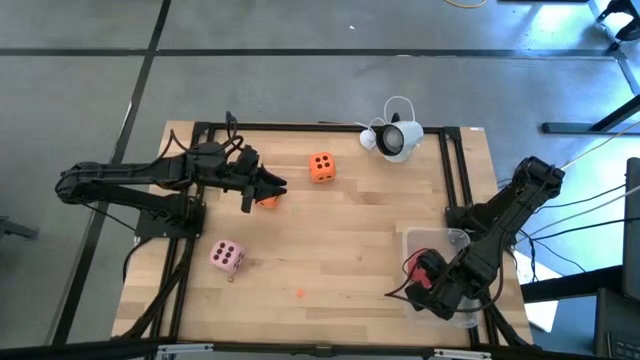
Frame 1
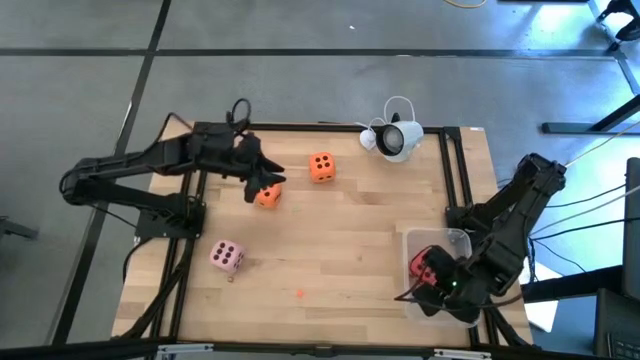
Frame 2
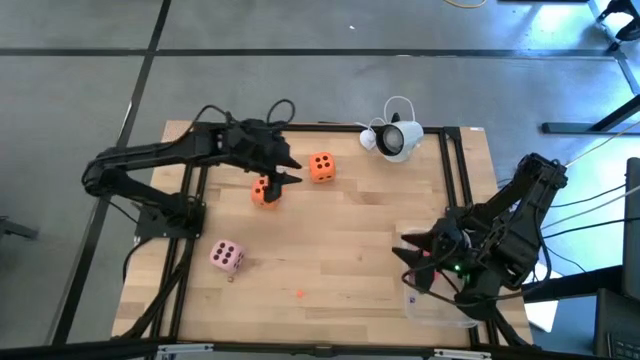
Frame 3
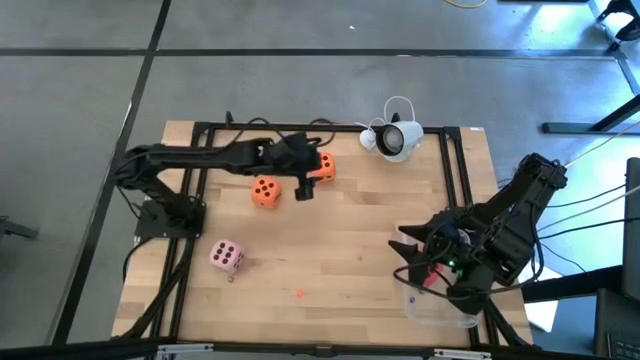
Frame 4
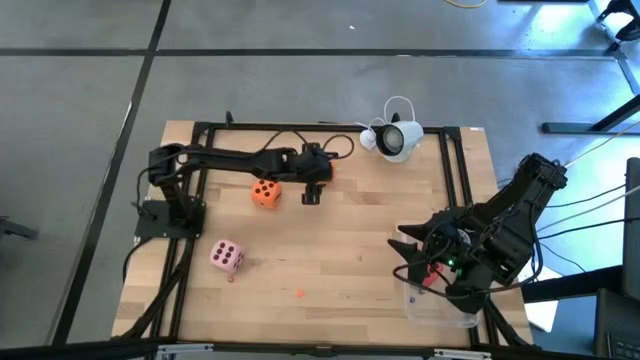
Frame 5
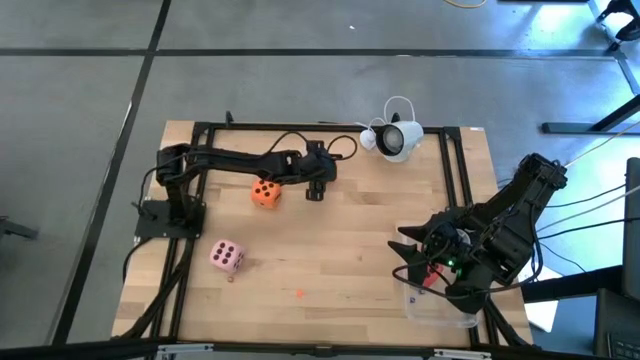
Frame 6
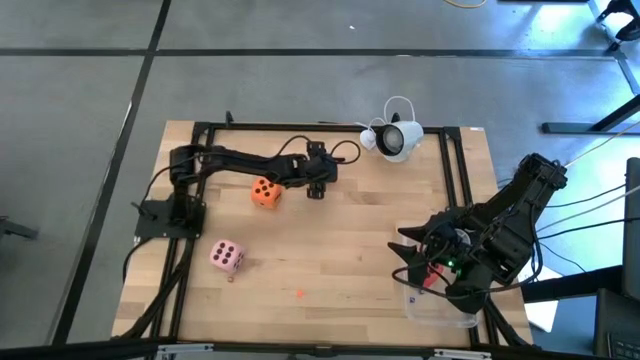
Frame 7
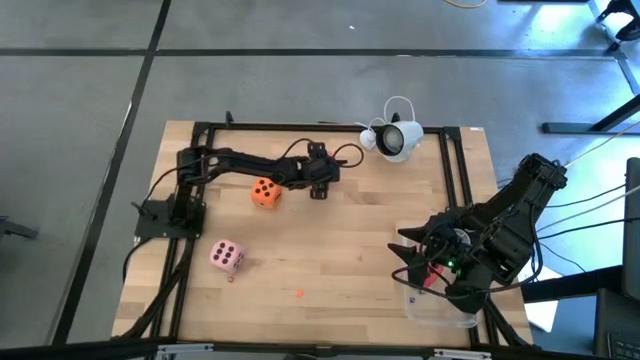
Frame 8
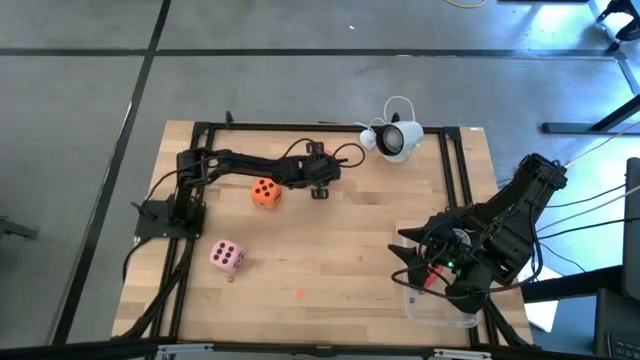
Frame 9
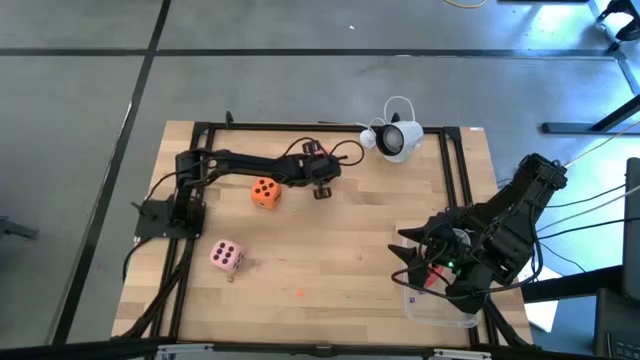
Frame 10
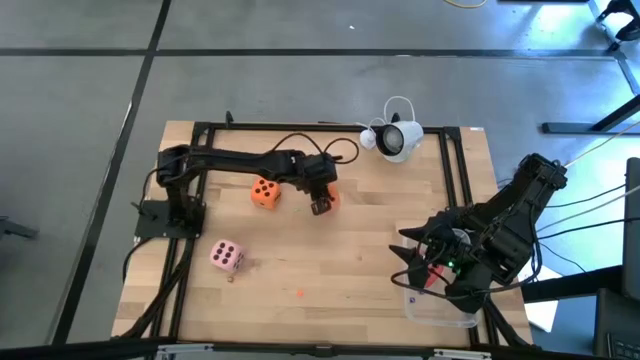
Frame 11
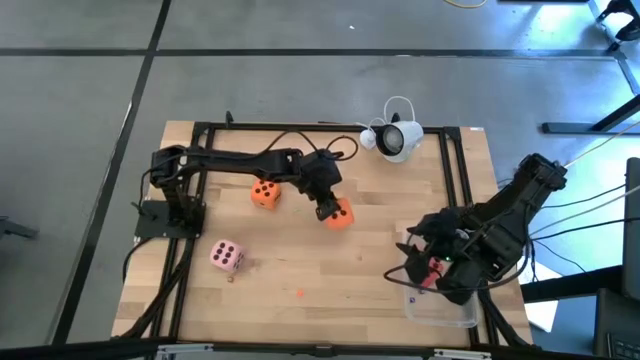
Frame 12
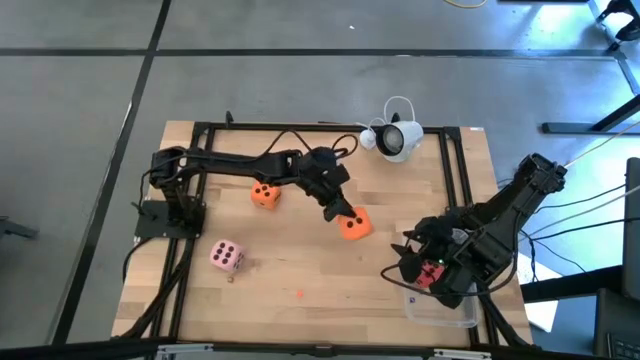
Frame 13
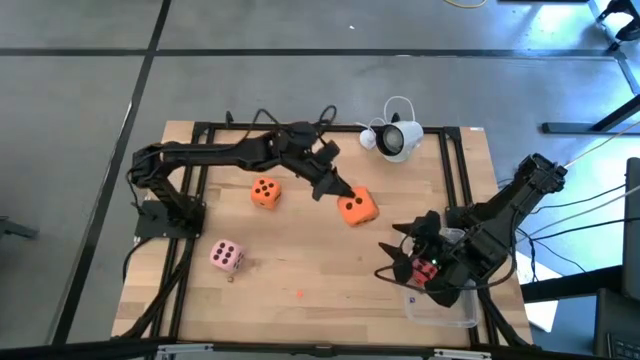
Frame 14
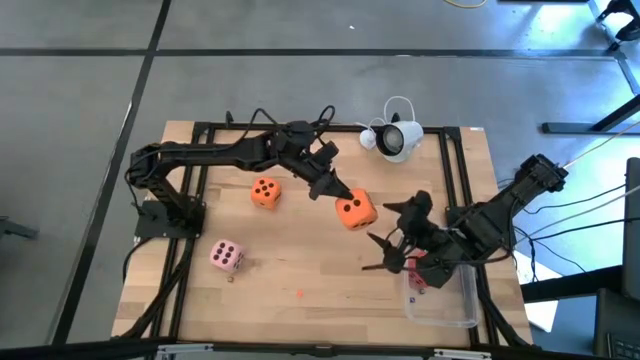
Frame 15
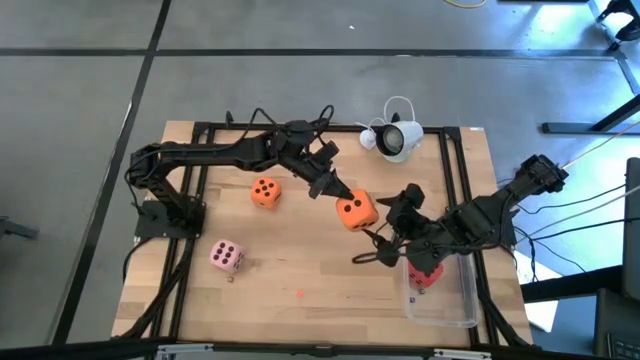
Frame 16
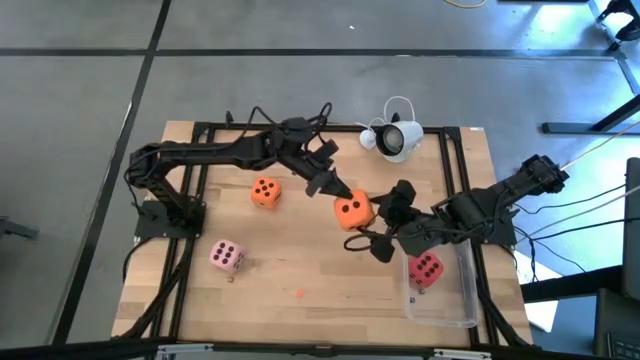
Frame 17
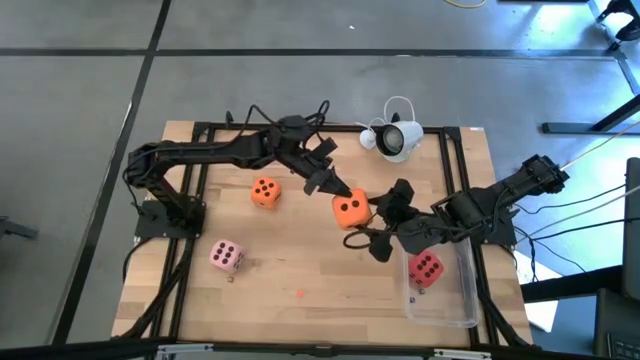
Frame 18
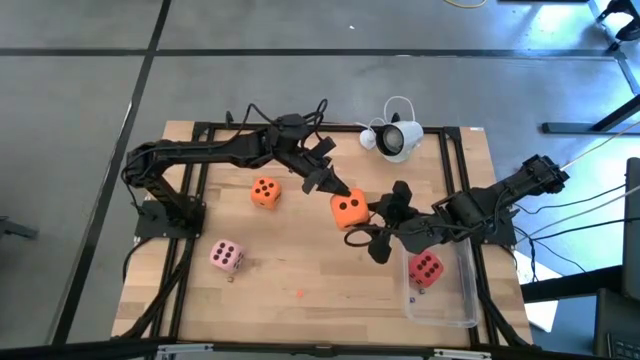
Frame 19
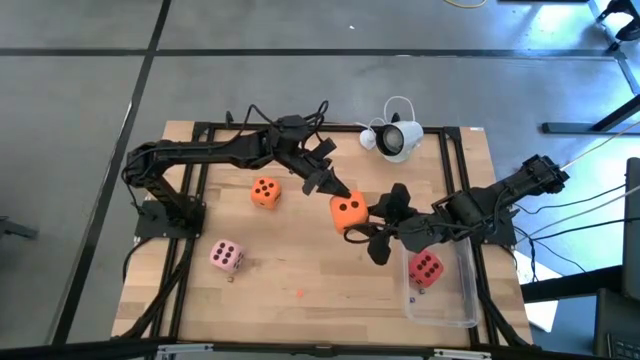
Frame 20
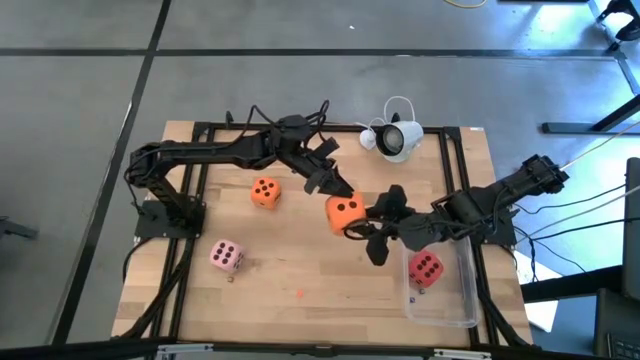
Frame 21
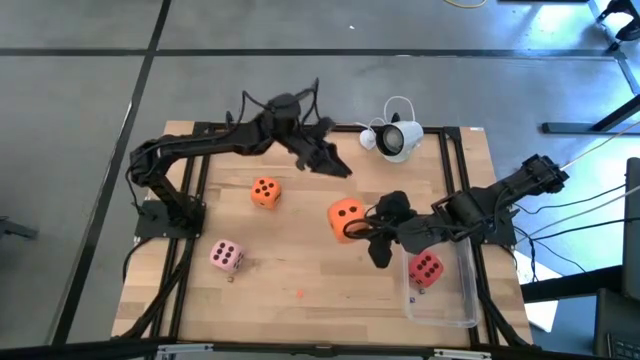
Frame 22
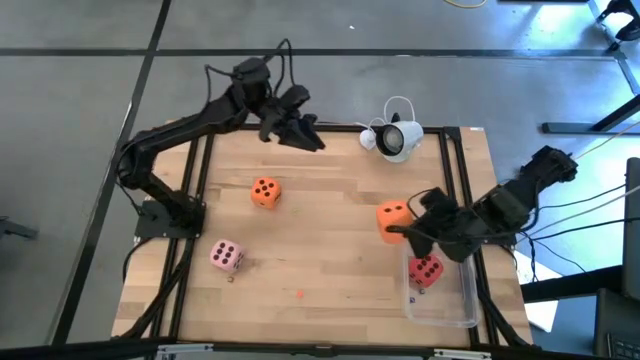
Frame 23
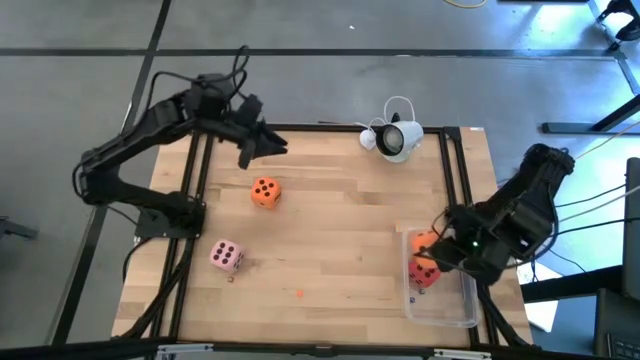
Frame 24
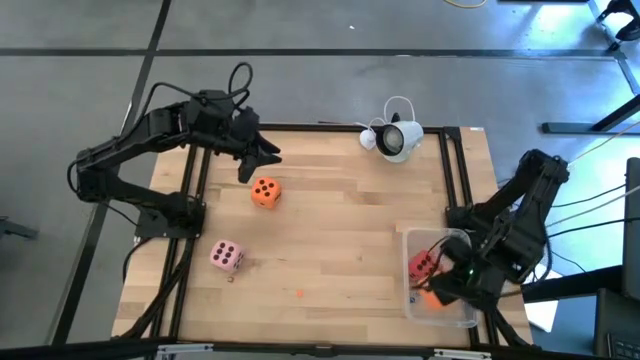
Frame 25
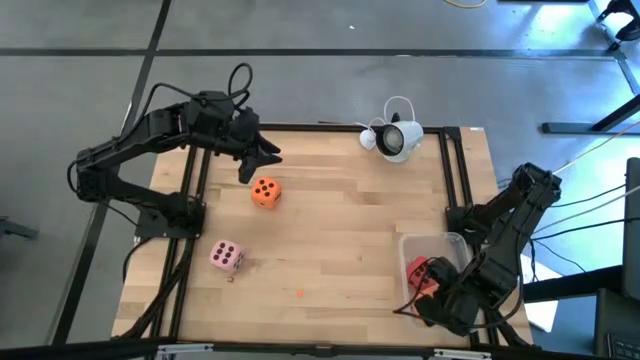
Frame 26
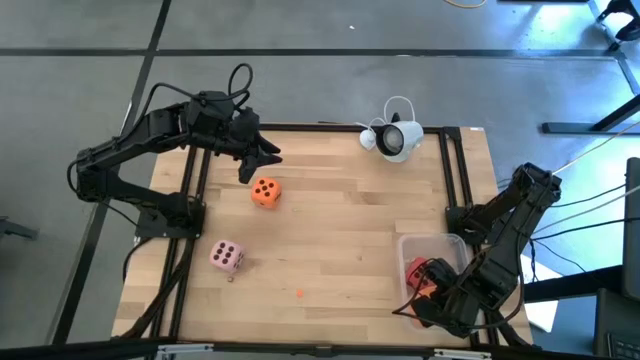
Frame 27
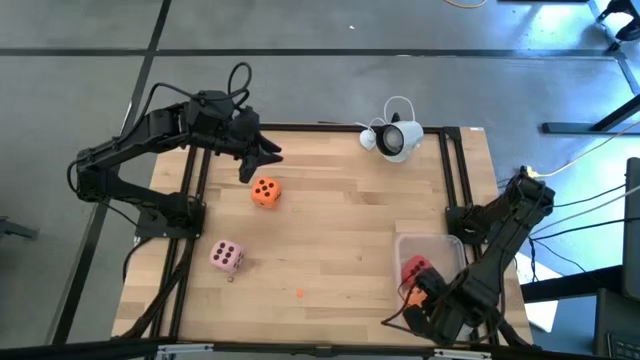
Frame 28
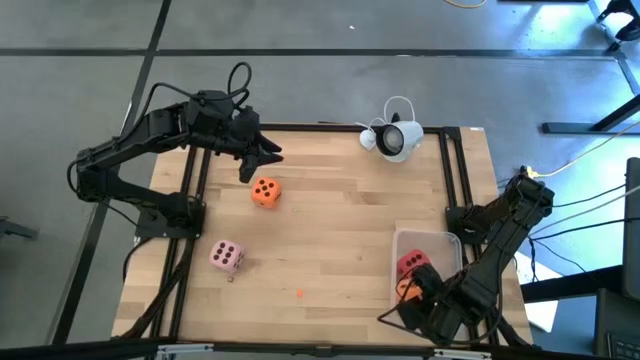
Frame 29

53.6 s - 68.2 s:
Task: Pick & Place Dice
Put the large orange die into the transparent bin

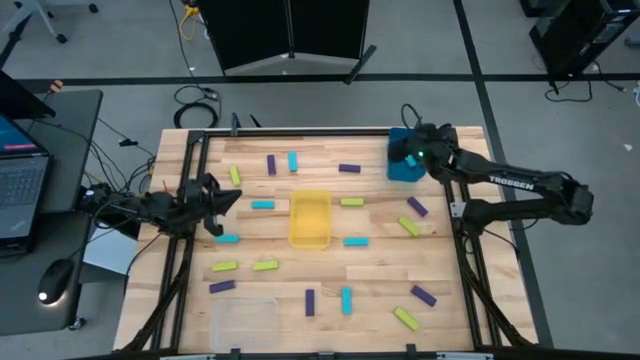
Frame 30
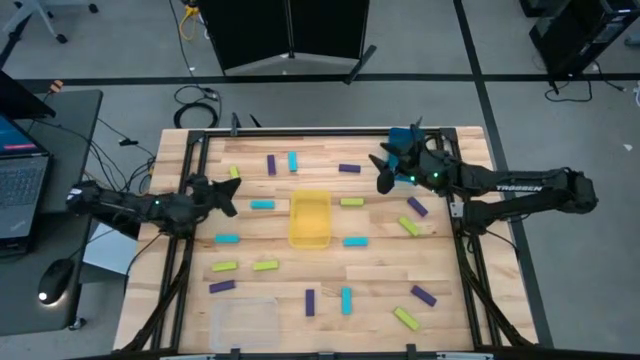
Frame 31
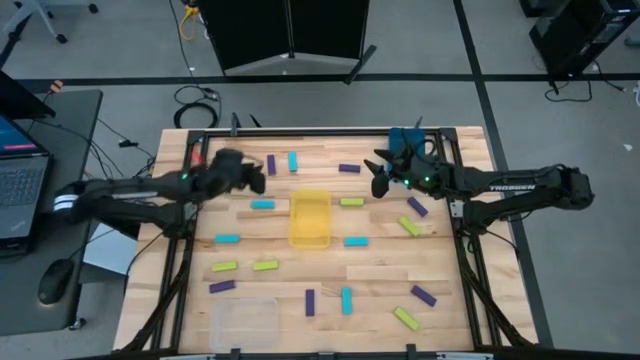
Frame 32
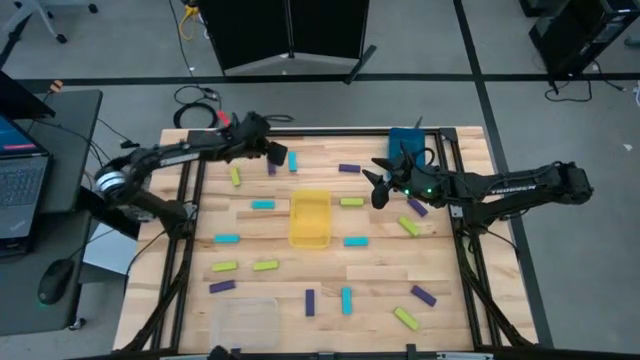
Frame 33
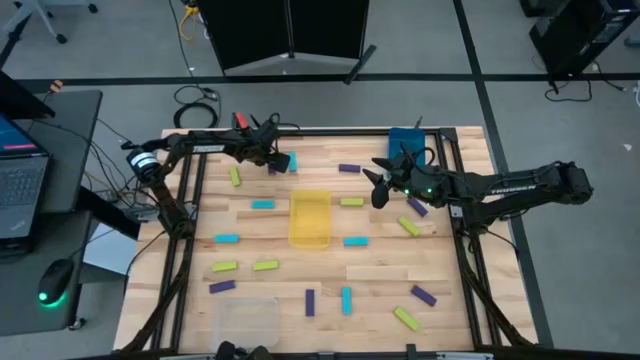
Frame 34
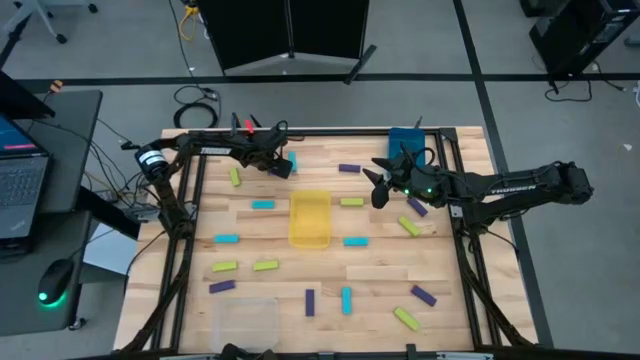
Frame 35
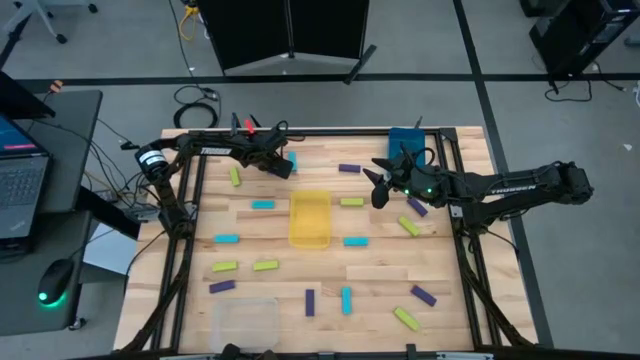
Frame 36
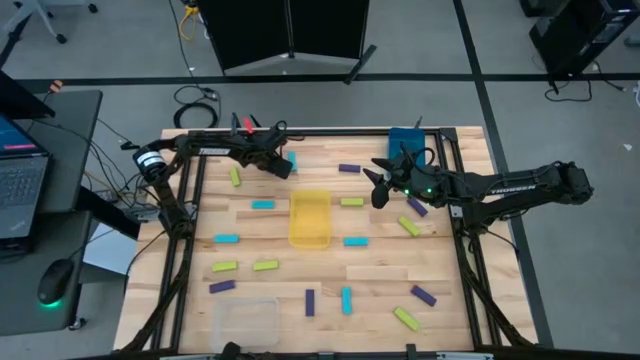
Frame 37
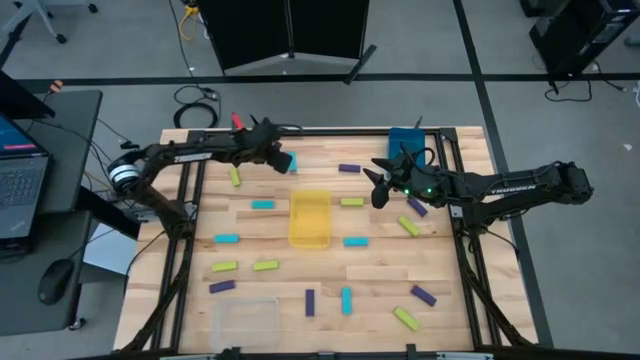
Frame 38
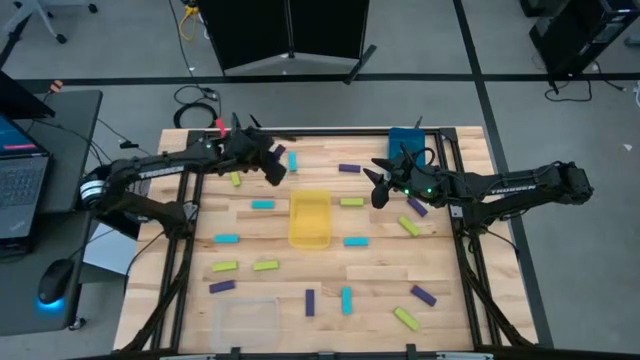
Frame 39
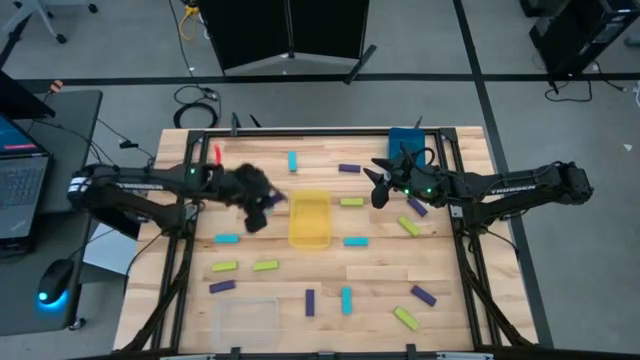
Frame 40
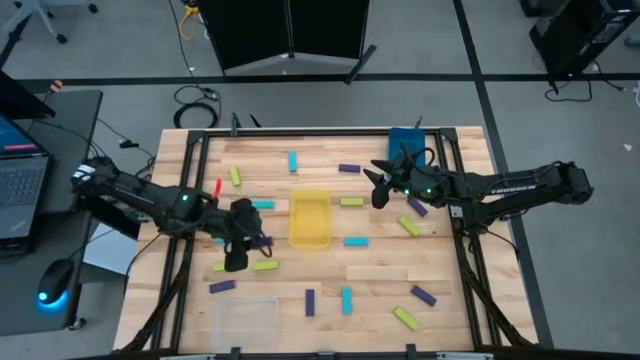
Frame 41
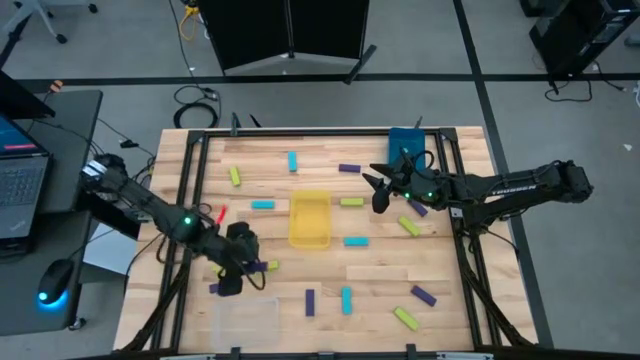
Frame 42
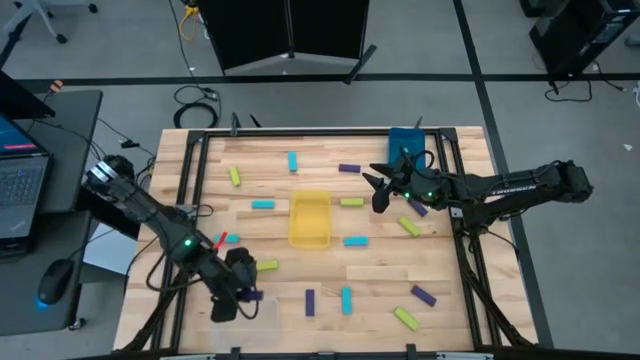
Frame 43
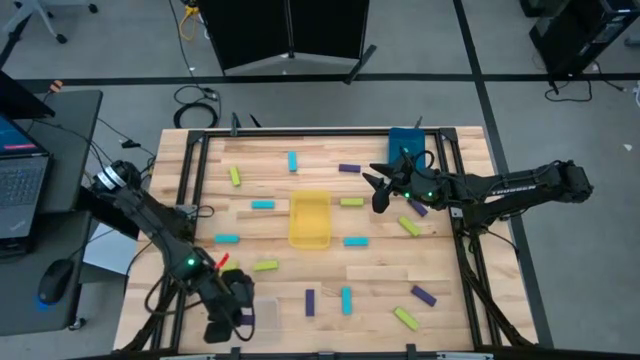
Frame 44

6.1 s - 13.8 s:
Task: Sort blocks
Put the purple block into the transparent bin
